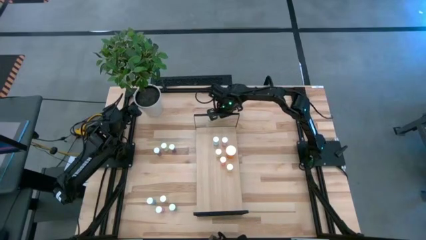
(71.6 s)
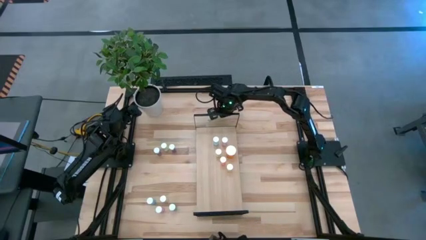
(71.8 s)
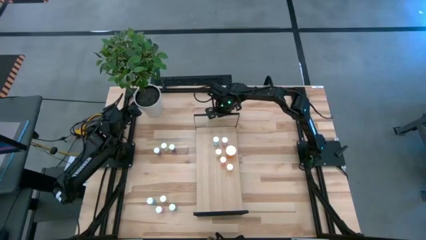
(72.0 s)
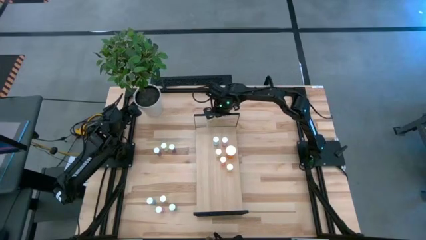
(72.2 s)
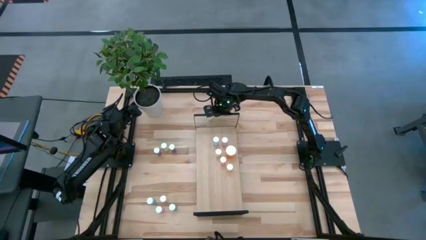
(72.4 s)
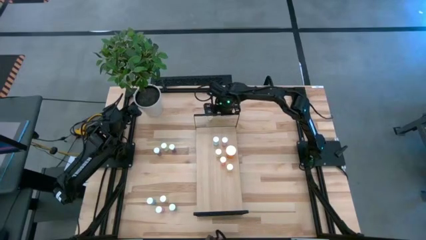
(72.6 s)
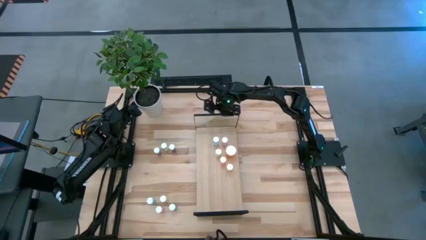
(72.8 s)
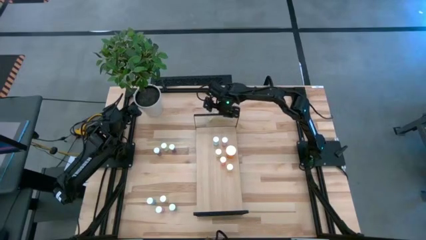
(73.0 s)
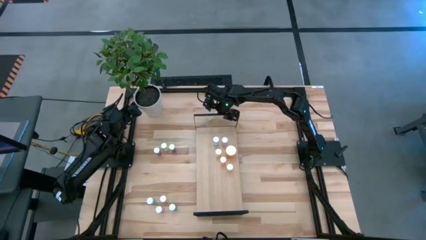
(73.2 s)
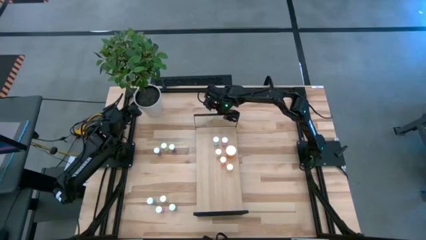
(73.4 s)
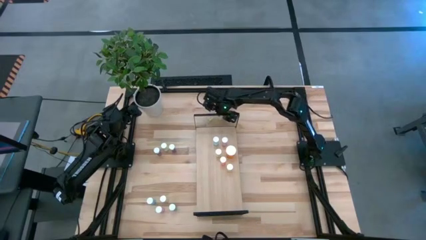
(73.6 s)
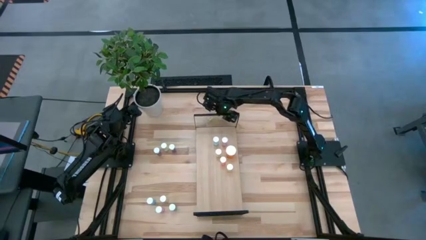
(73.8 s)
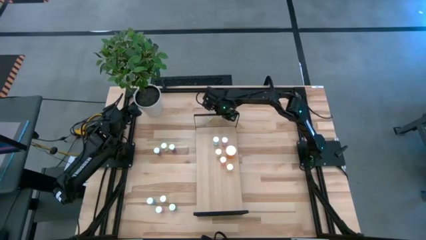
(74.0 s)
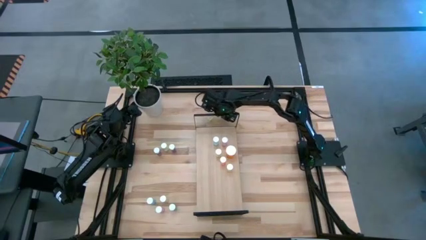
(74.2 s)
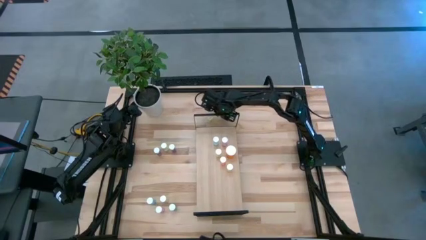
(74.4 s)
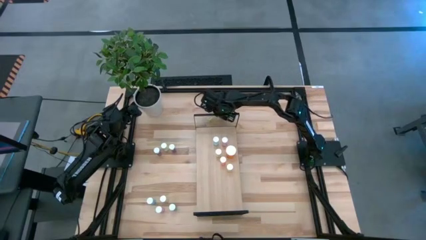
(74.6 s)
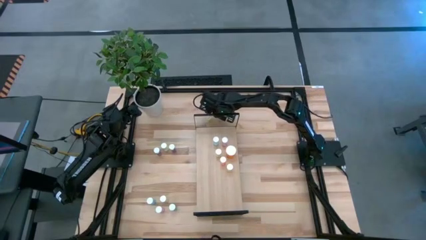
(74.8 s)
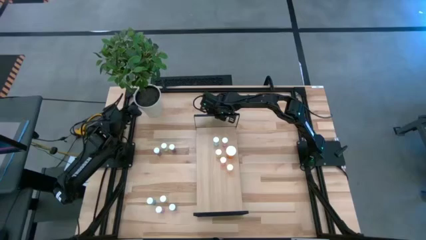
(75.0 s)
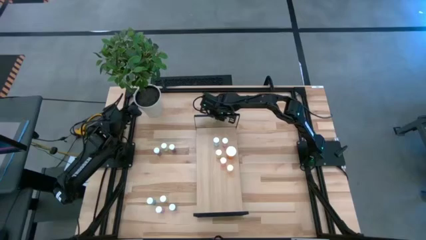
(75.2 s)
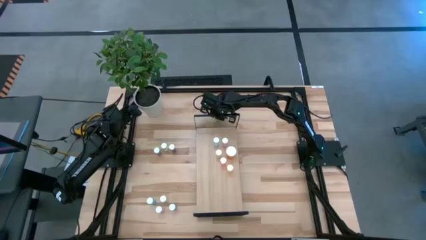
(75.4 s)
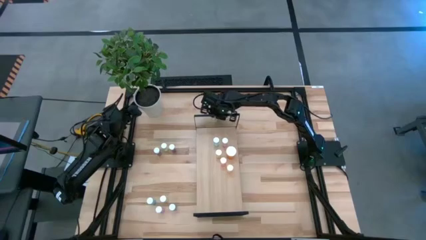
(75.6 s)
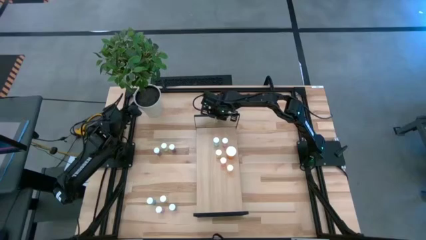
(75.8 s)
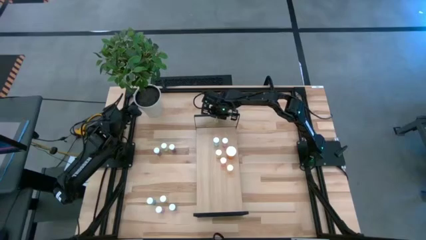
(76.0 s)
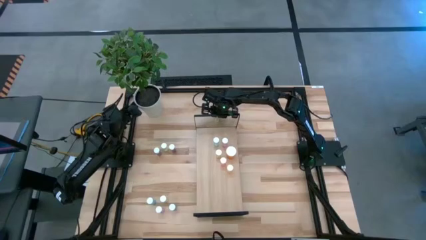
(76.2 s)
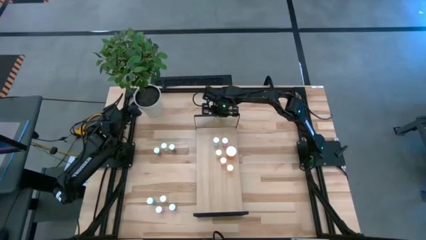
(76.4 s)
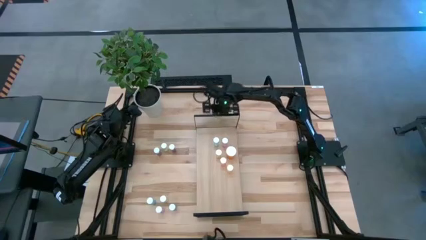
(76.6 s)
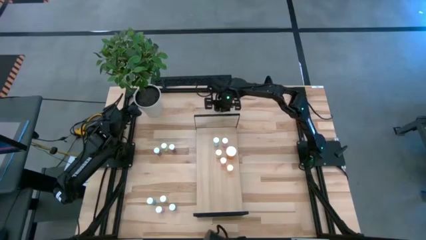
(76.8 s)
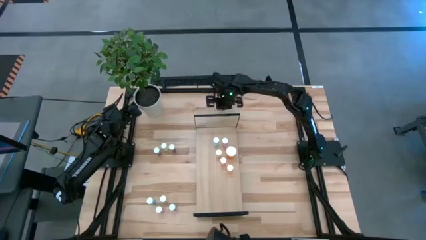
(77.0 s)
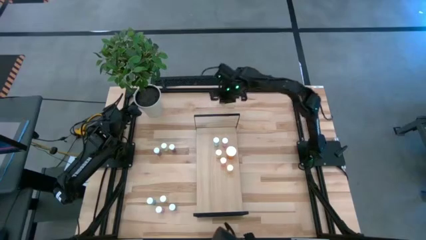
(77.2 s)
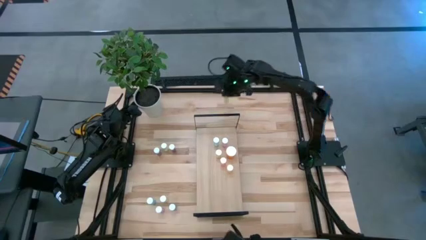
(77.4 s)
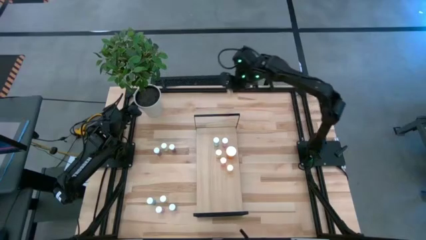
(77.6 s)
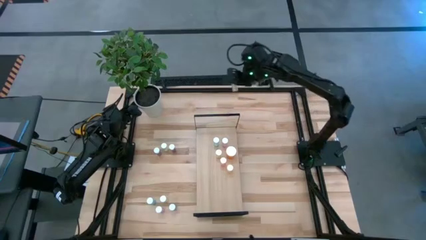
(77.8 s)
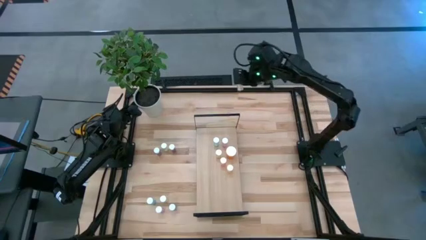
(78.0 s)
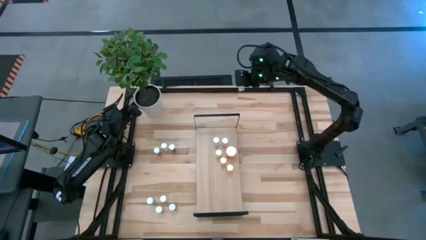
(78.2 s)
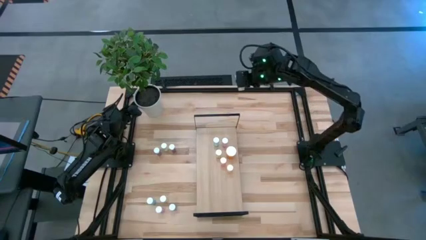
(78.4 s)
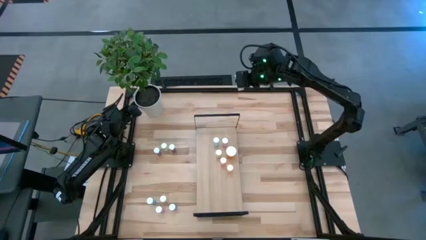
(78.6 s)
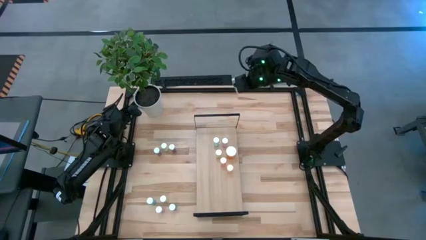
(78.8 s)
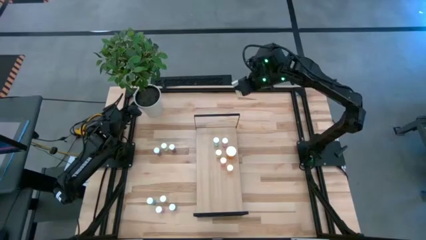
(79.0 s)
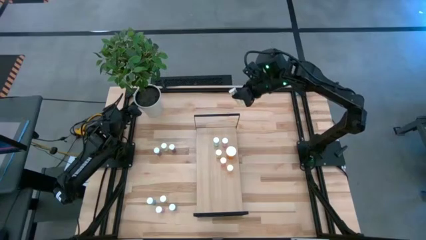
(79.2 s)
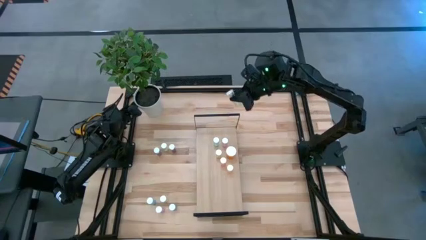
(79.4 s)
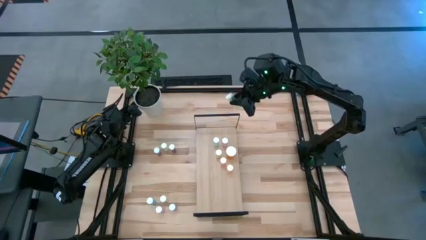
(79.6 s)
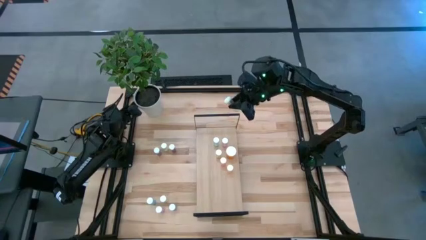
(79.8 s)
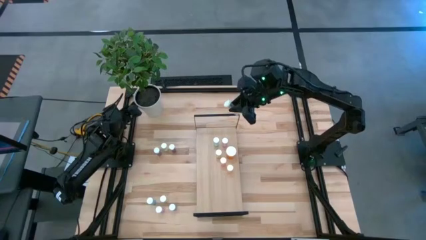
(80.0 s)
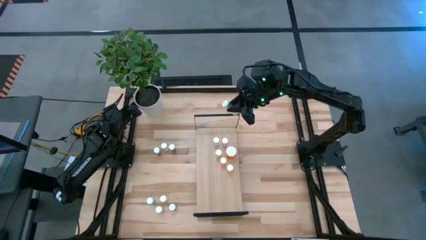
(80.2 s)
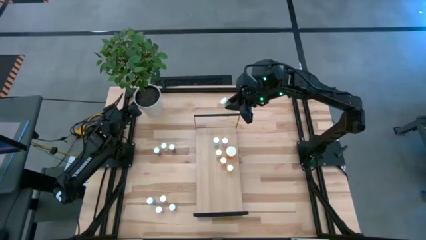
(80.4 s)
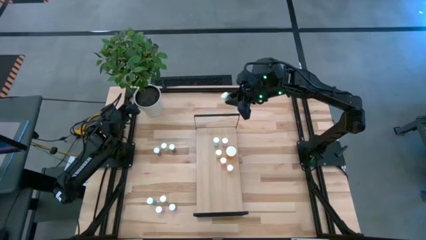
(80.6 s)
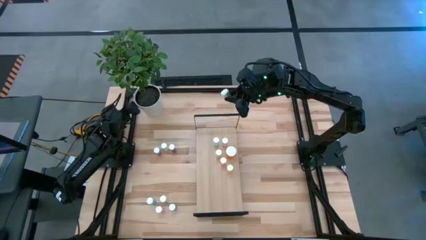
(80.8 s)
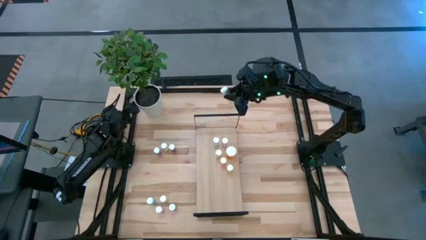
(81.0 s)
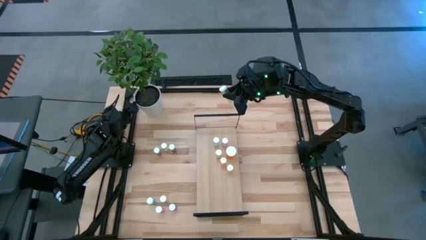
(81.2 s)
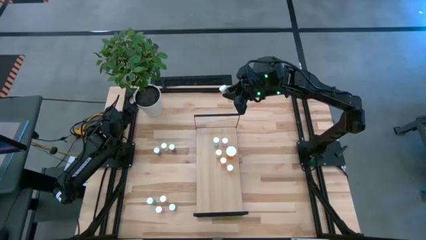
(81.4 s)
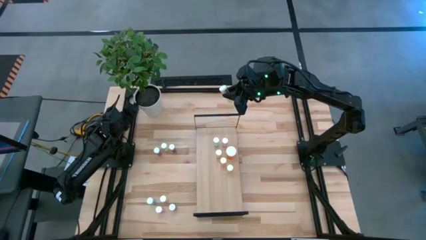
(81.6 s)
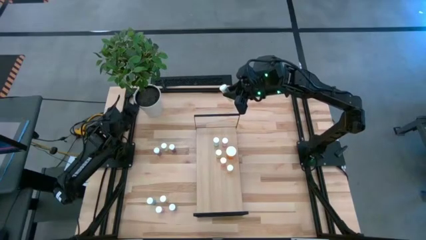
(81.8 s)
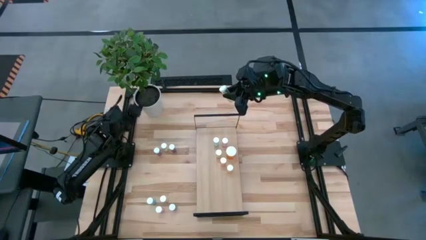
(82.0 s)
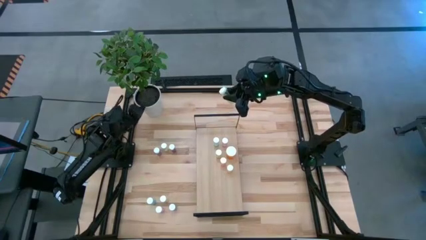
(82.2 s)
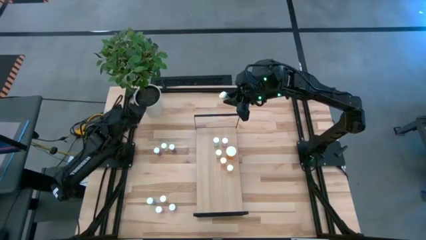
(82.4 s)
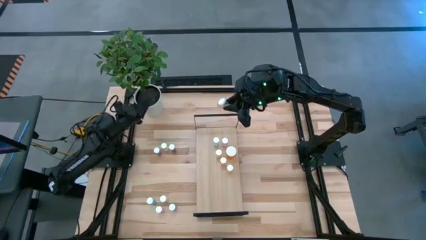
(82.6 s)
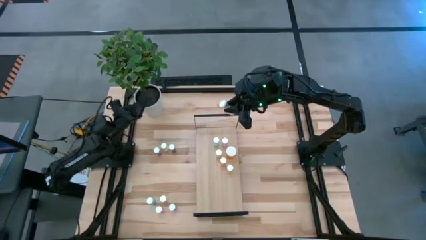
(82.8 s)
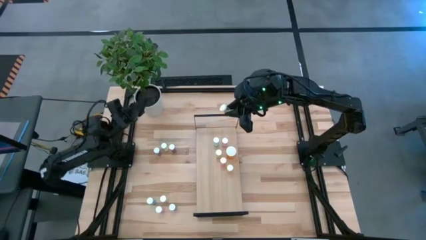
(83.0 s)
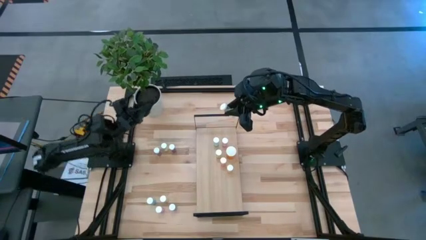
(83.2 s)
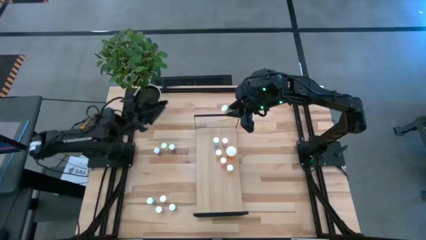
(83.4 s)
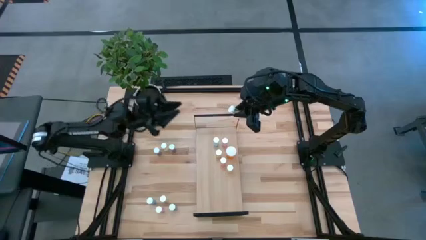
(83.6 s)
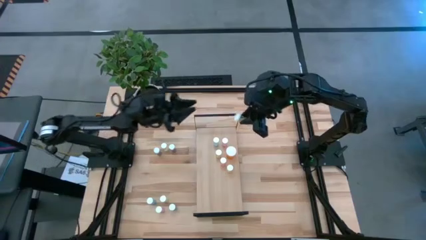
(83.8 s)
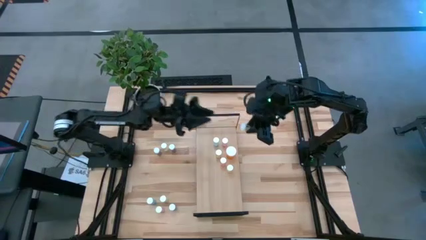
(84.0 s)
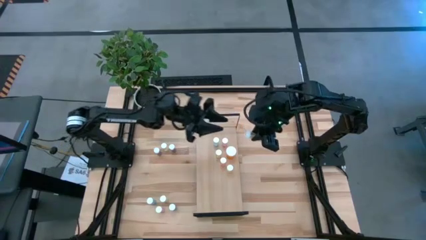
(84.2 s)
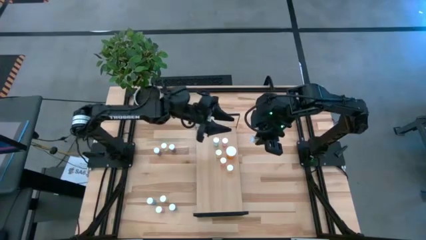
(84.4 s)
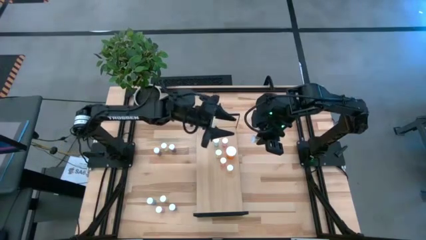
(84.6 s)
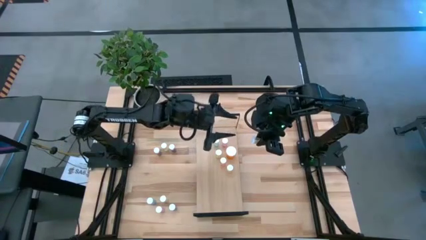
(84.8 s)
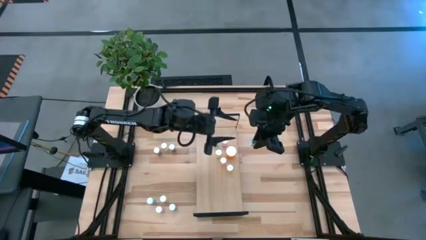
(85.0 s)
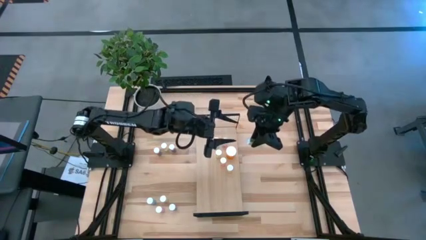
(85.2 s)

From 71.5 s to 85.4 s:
Task: Pick and place medicine bottles onto shelf by color
Put the yellow pill bottle on the shelf

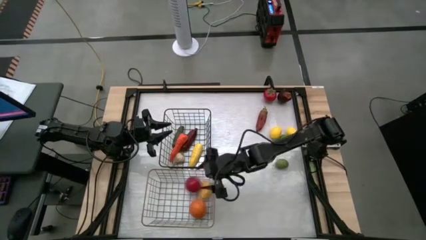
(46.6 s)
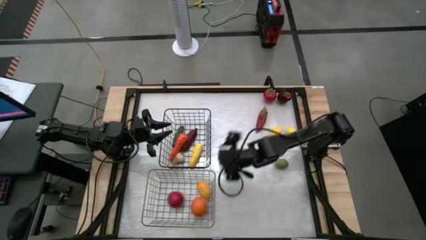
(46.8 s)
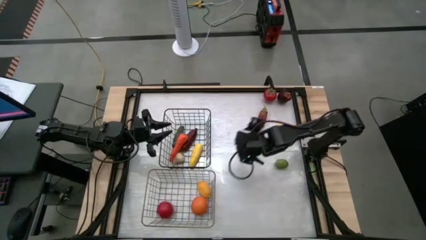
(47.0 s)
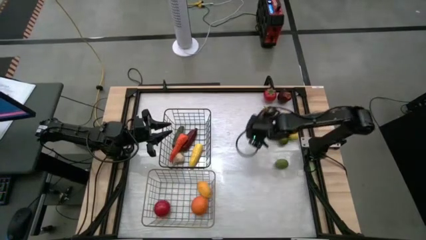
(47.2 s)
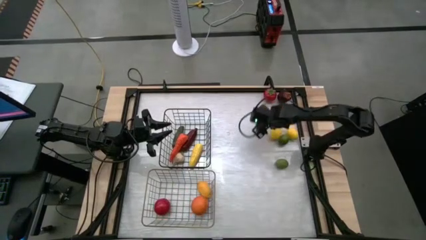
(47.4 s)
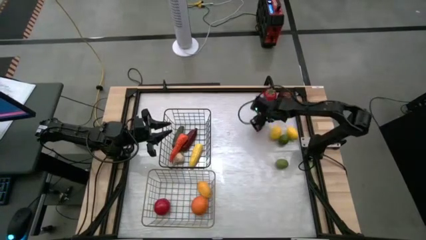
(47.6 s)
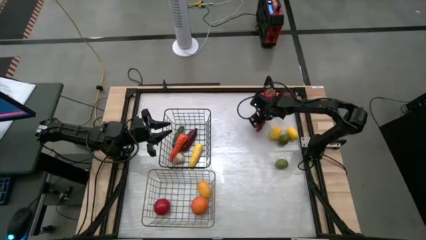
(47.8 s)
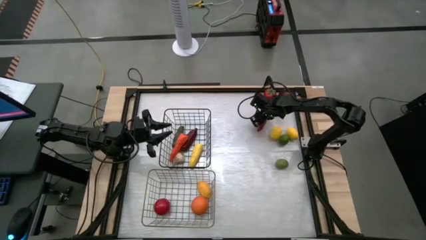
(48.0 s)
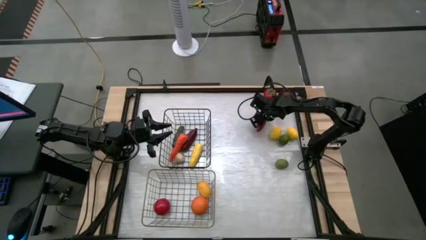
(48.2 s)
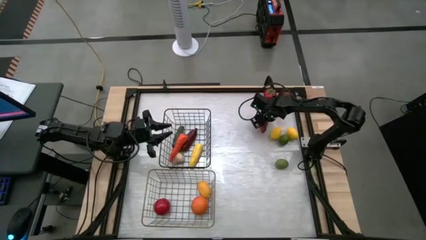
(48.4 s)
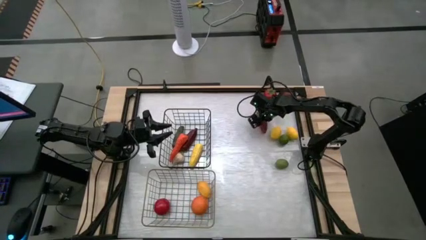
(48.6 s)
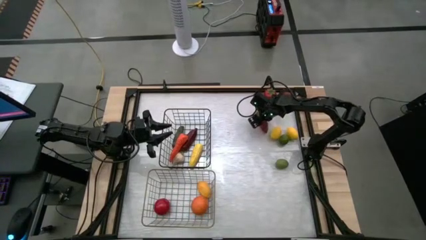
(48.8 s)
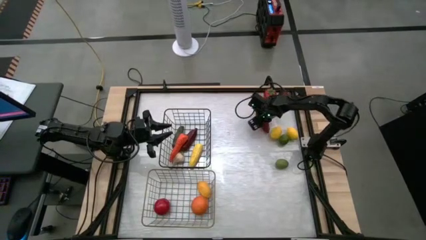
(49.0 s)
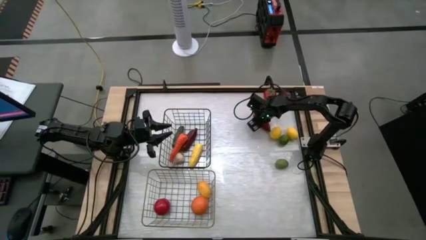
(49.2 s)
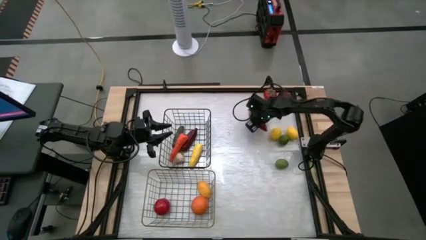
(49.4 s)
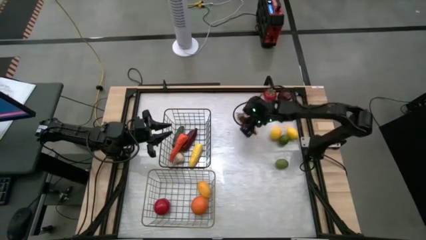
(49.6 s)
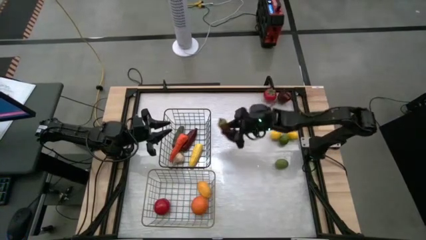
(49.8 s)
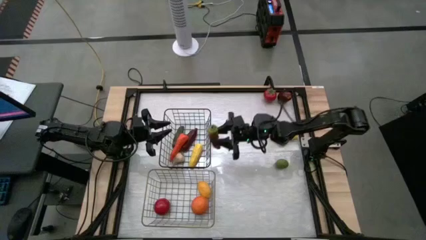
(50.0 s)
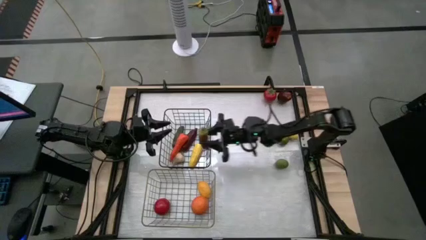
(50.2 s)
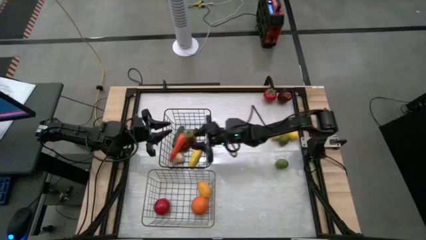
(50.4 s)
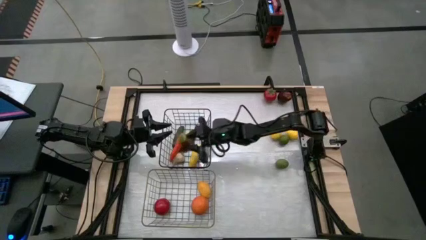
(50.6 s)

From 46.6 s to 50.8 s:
Task: Sort produce into baskets
Put the left red pepper into the black wire basket
